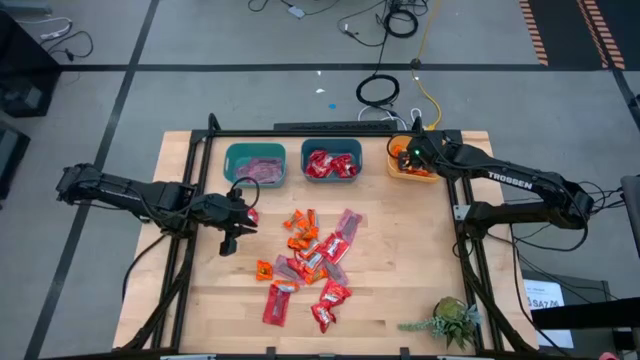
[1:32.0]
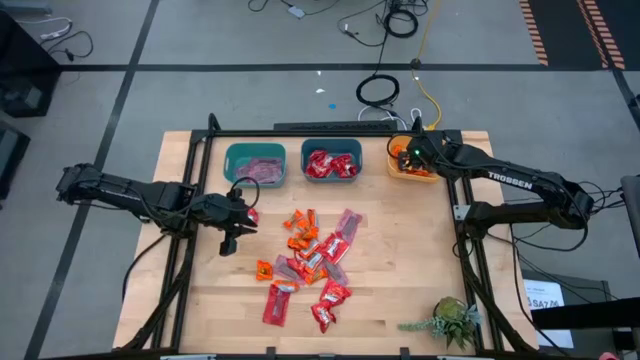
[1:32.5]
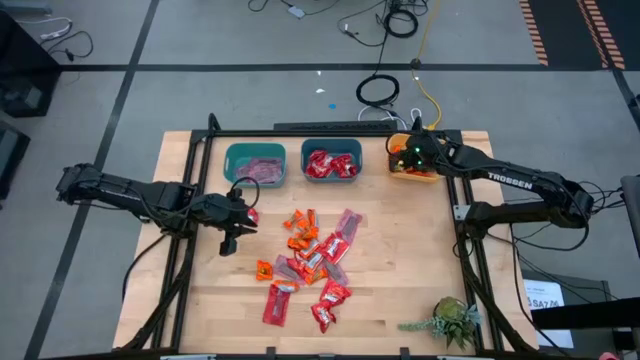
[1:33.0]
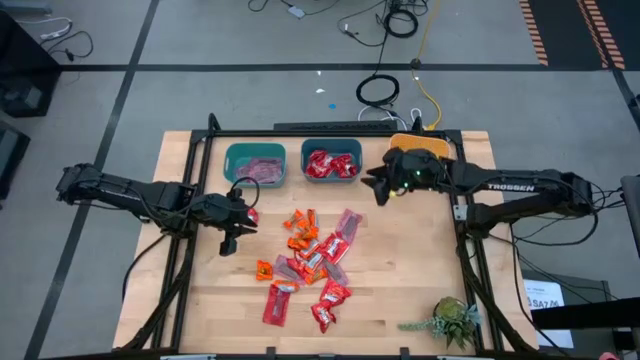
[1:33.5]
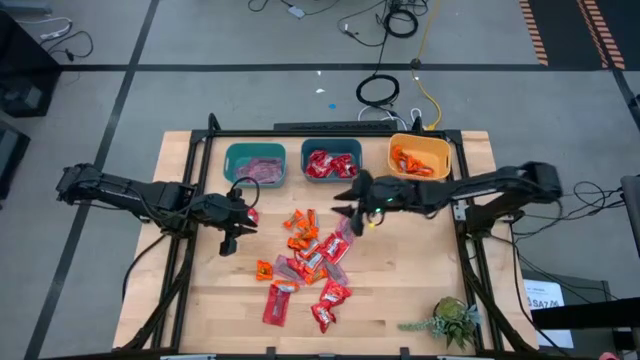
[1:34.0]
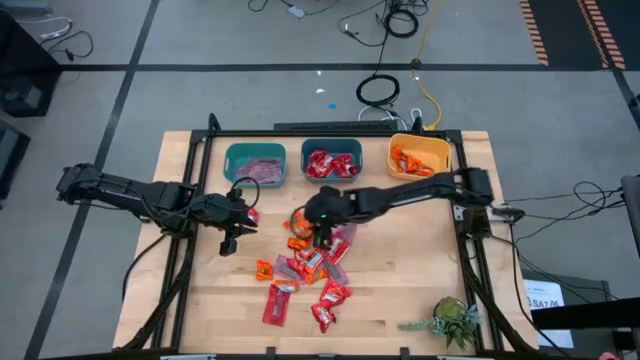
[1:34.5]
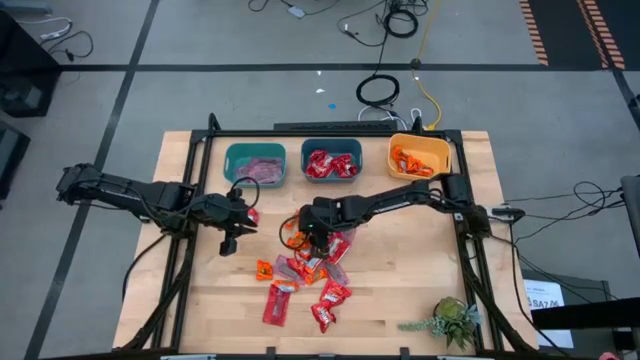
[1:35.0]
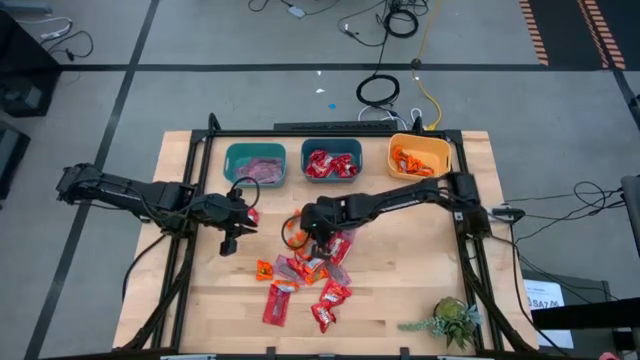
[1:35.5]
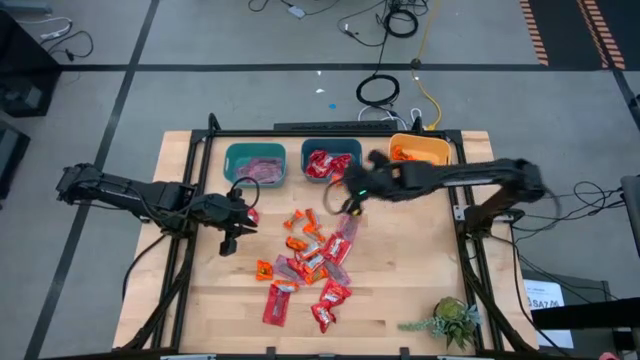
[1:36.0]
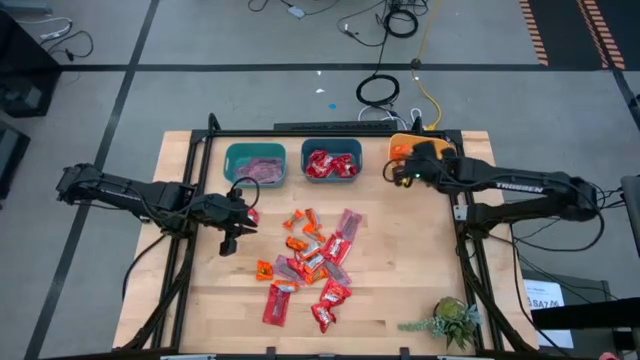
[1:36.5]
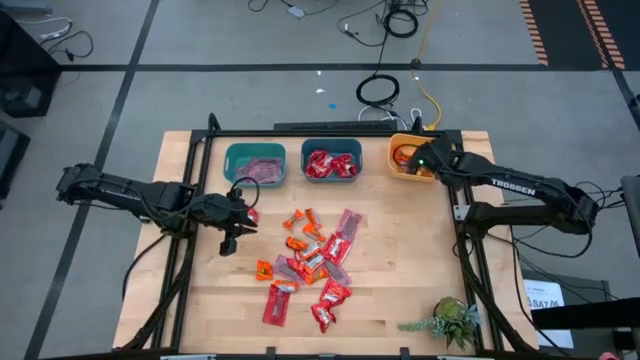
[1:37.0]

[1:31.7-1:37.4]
Task: Sort candy
Put the orange chocolate into the yellow bin

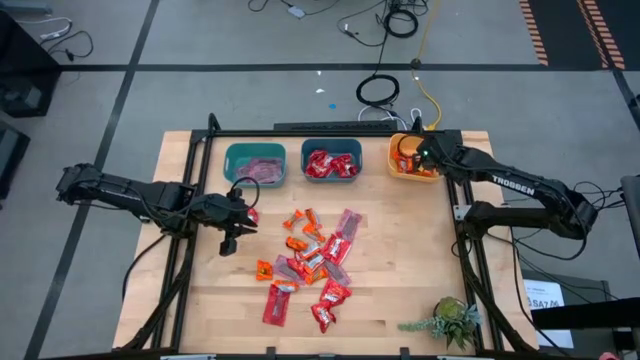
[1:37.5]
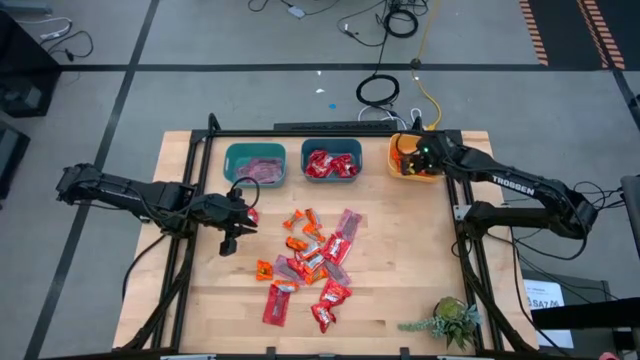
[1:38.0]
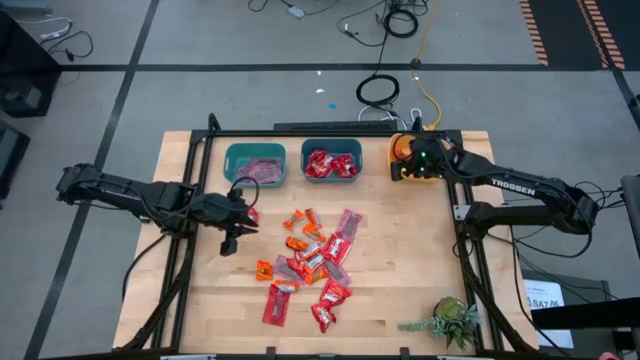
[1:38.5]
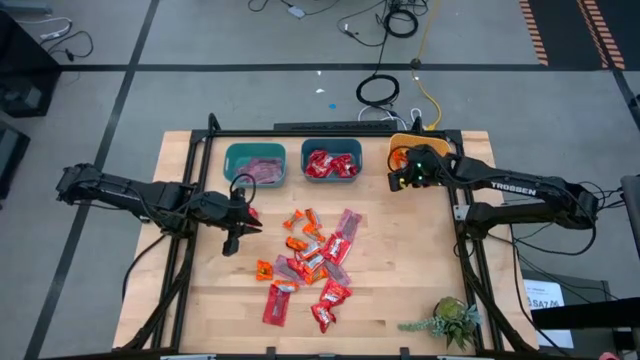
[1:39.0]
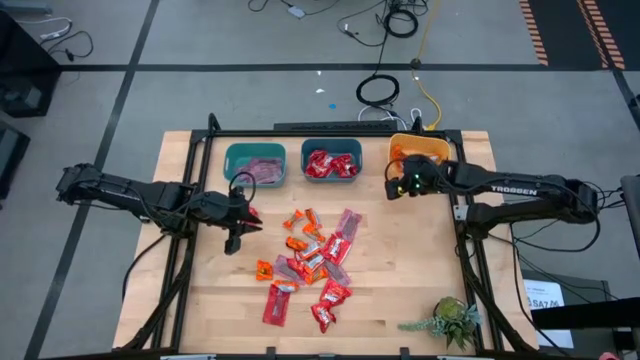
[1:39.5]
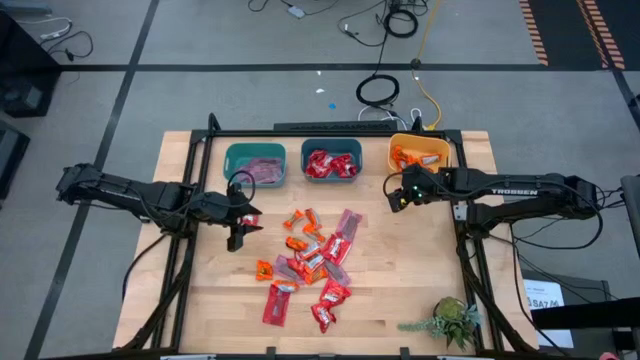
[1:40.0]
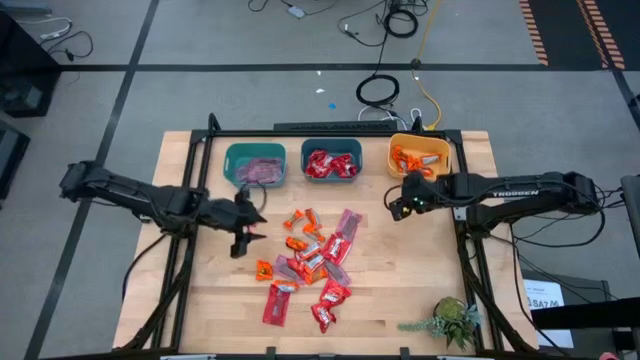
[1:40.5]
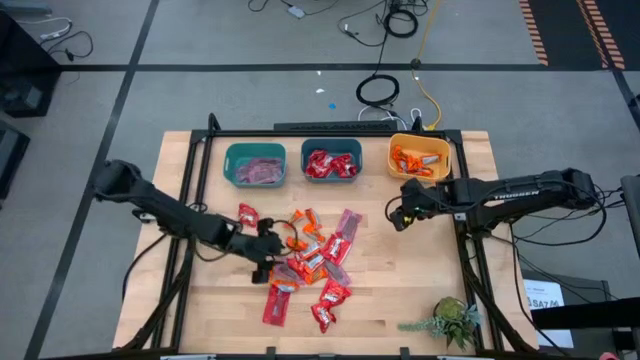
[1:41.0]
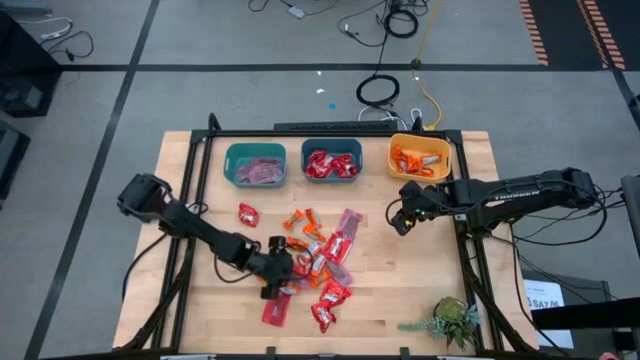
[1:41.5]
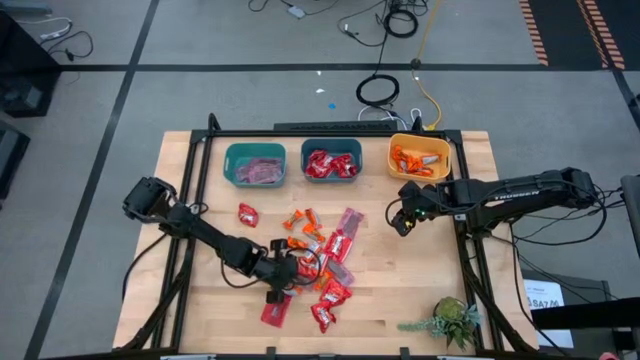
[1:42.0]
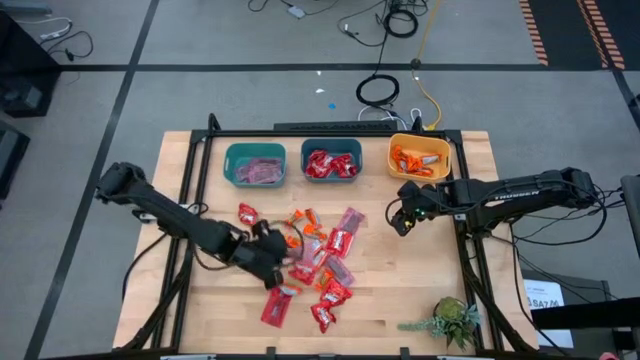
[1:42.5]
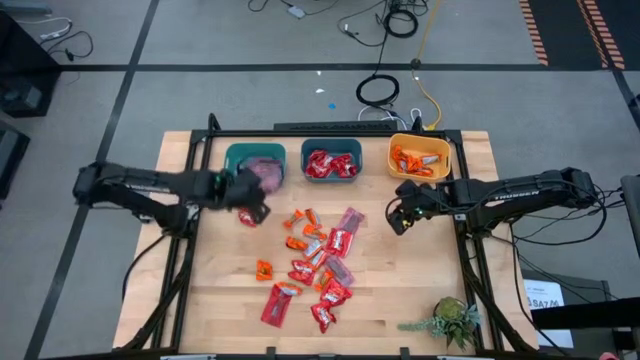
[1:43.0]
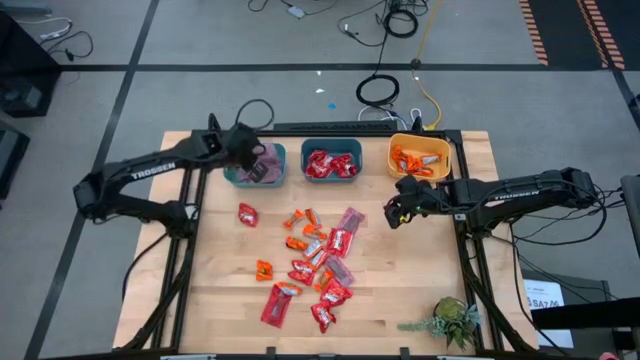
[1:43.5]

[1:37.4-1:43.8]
Put the red chocolate into the green bin

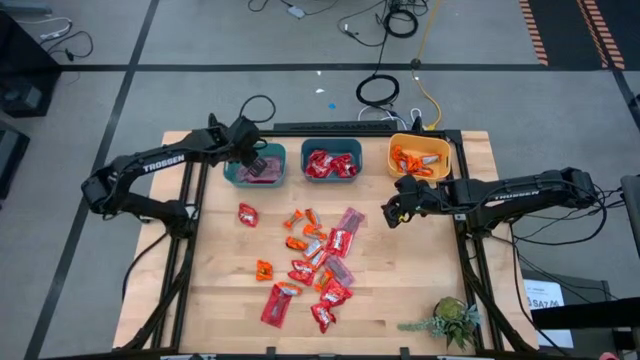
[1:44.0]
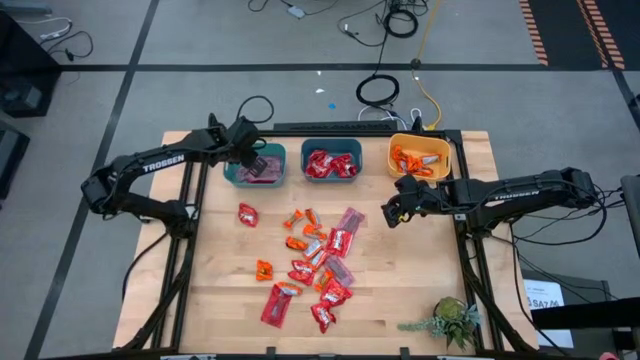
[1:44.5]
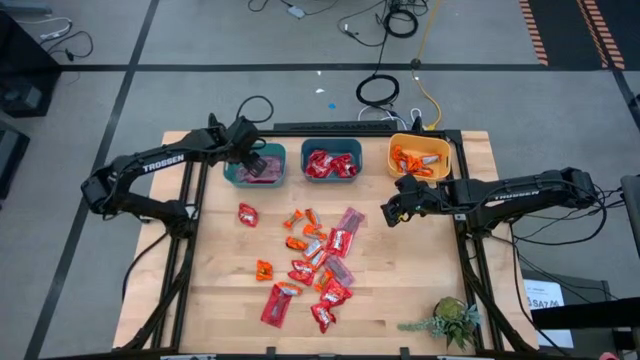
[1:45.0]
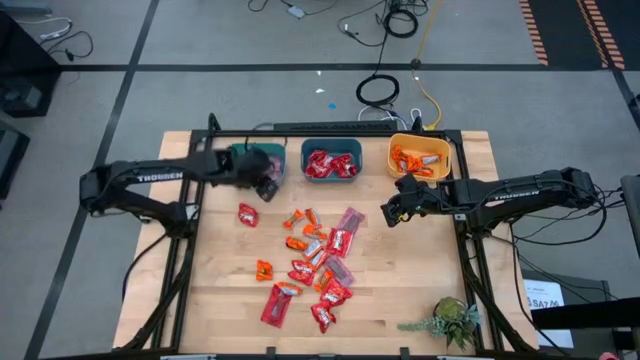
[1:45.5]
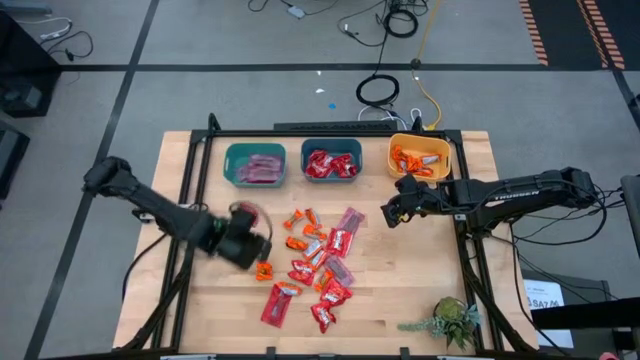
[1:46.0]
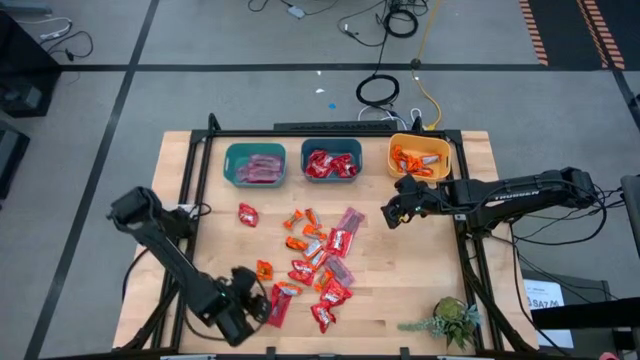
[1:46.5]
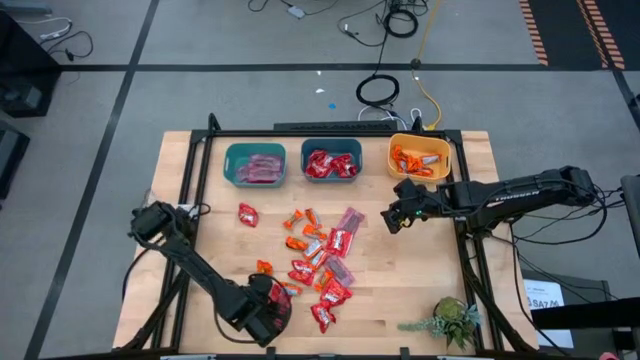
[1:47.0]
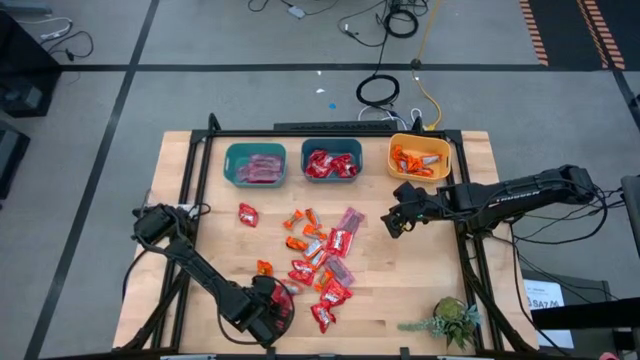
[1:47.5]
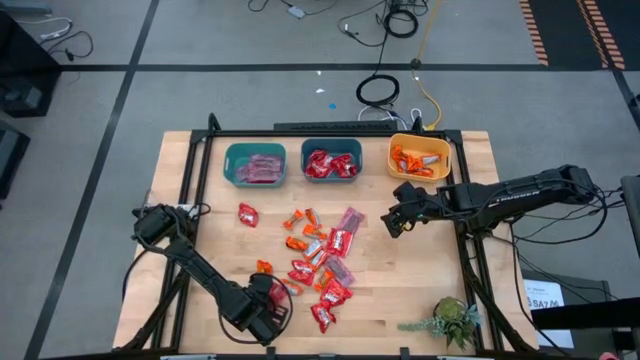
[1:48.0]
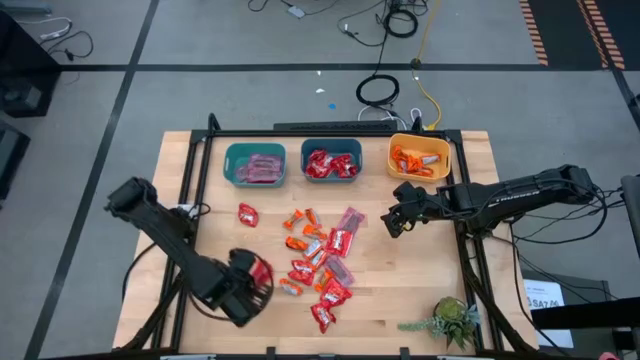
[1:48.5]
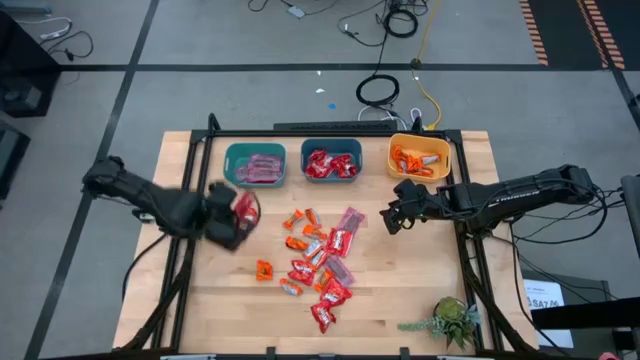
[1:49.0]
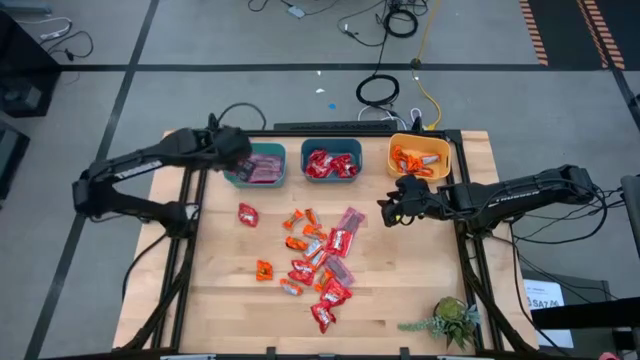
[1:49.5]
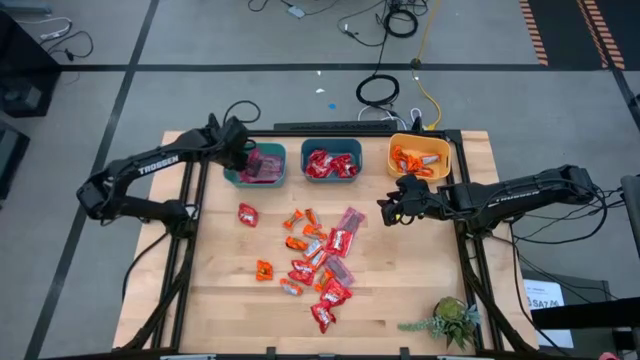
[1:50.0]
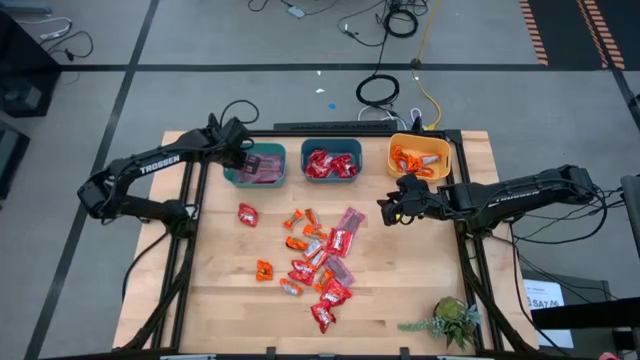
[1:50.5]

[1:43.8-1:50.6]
Put the red chocolate into the green bin

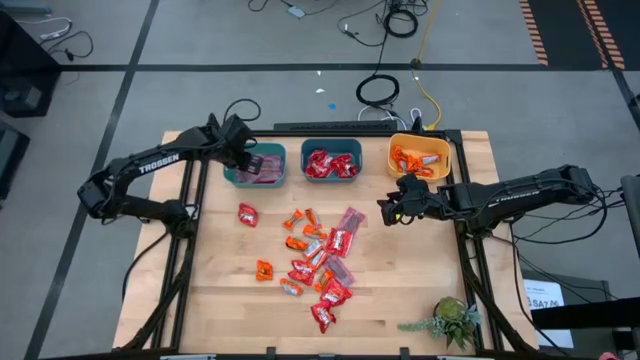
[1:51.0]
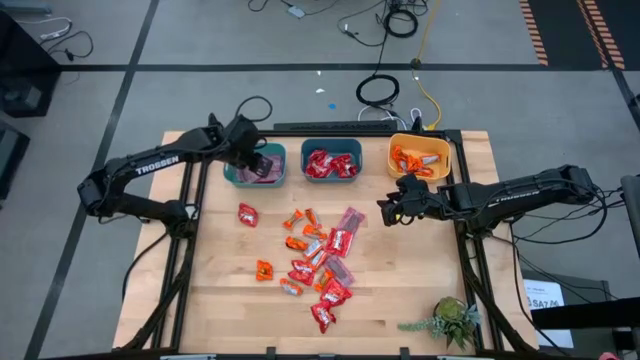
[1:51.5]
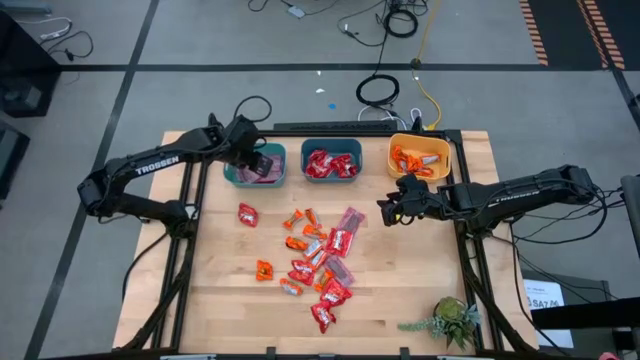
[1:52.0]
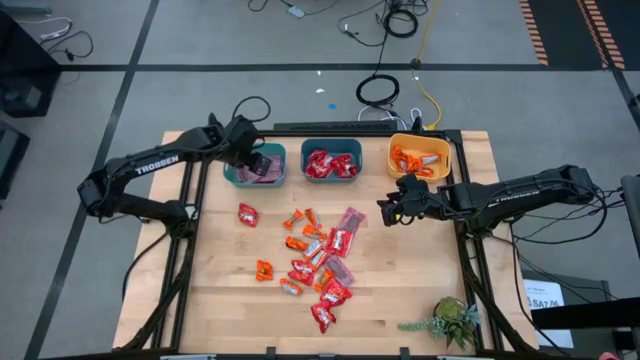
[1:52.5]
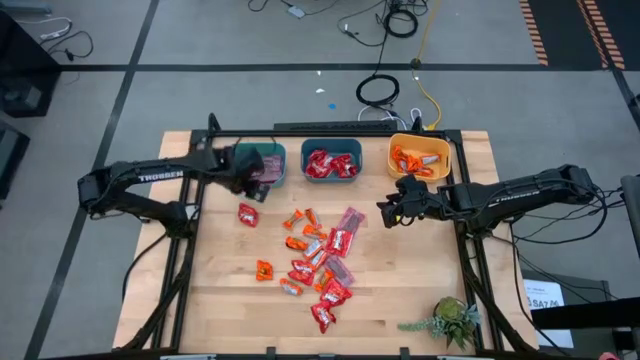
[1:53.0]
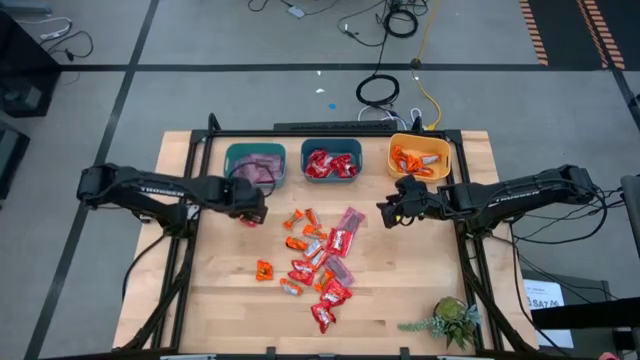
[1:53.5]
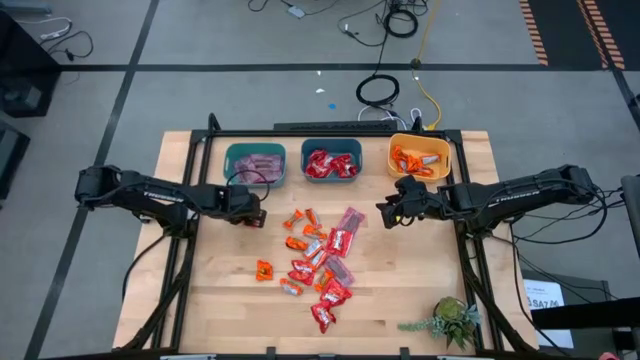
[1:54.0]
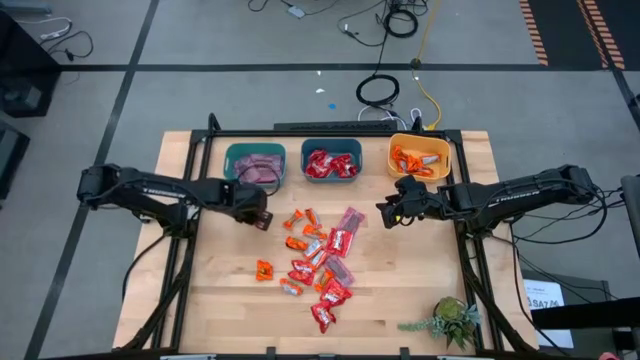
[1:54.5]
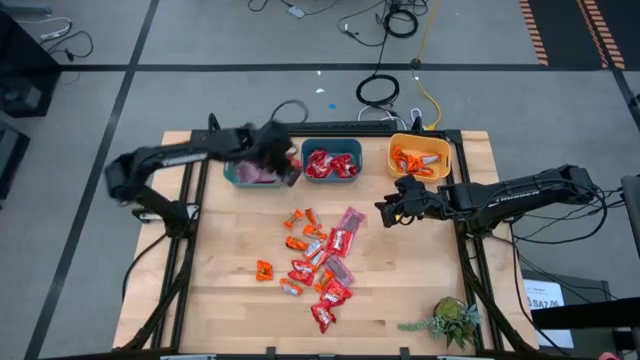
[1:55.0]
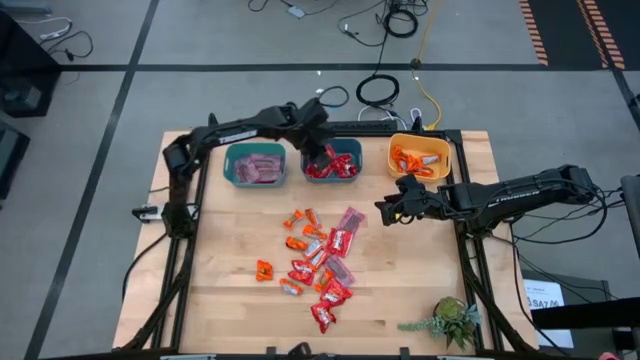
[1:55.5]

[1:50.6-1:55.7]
Put the red candy into the blue bin
